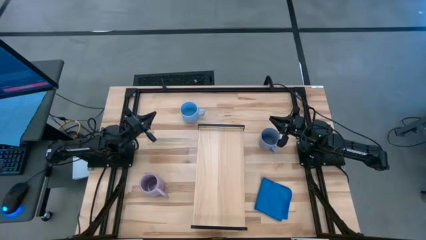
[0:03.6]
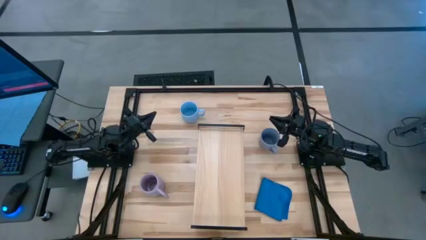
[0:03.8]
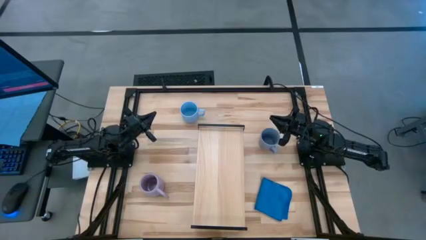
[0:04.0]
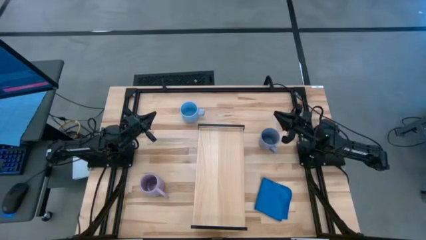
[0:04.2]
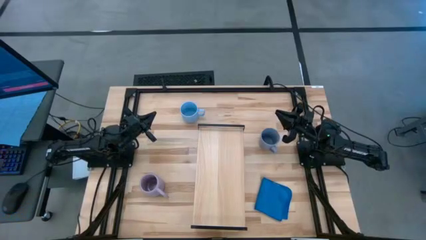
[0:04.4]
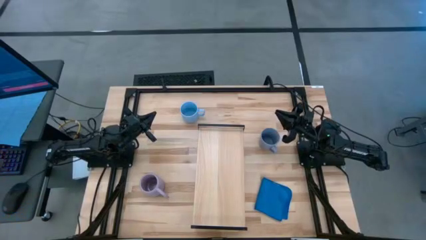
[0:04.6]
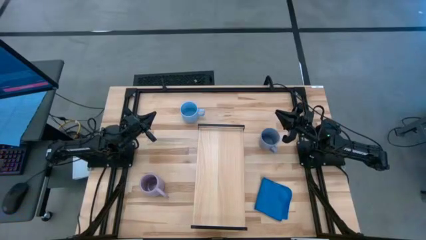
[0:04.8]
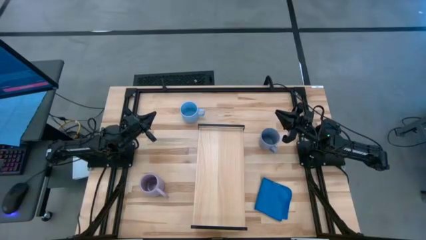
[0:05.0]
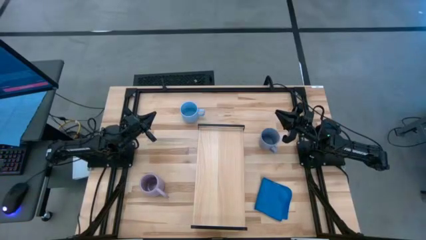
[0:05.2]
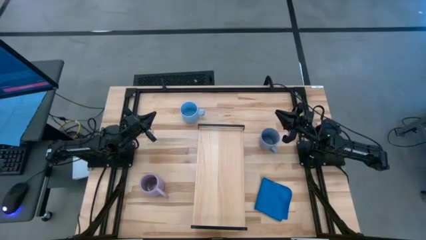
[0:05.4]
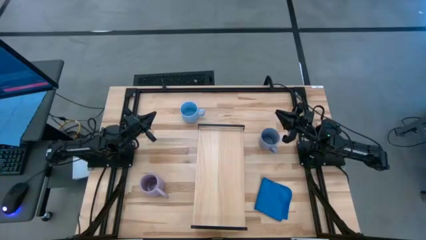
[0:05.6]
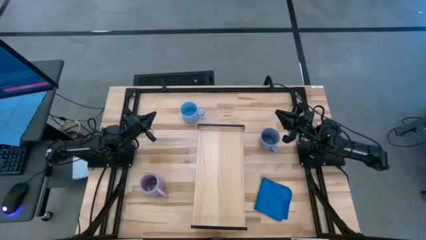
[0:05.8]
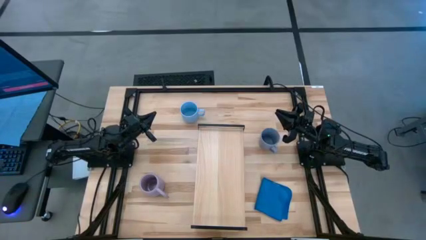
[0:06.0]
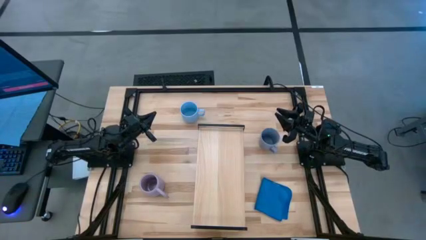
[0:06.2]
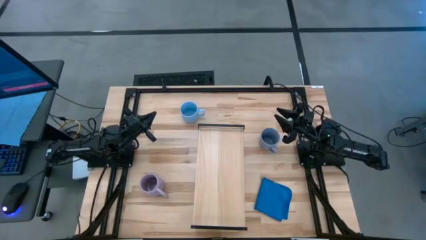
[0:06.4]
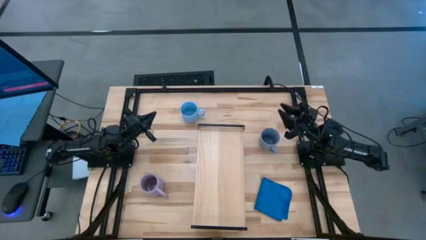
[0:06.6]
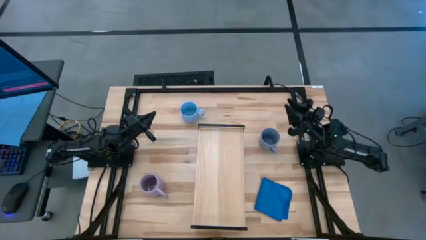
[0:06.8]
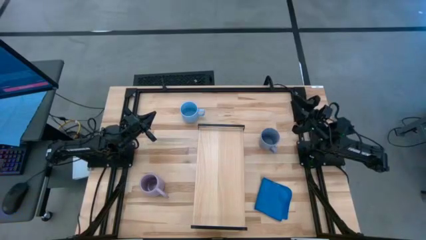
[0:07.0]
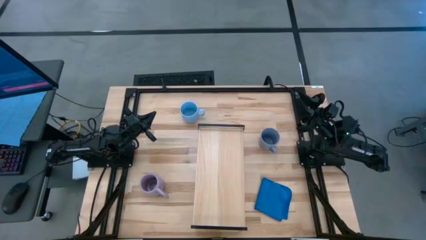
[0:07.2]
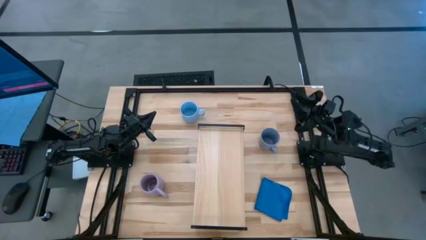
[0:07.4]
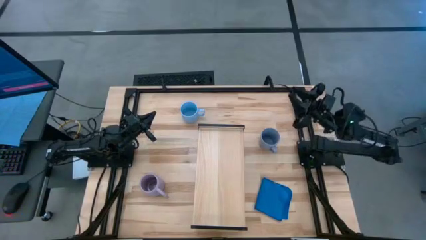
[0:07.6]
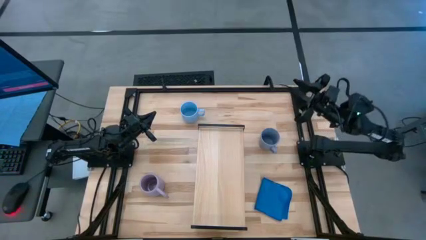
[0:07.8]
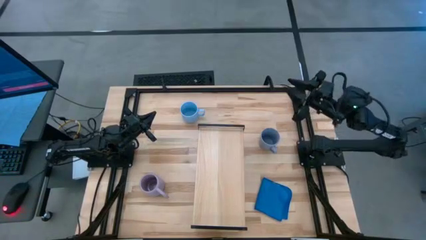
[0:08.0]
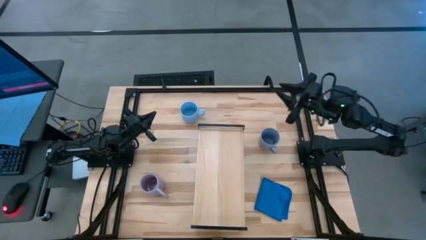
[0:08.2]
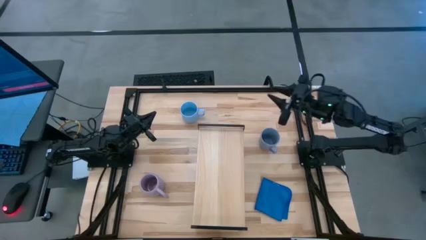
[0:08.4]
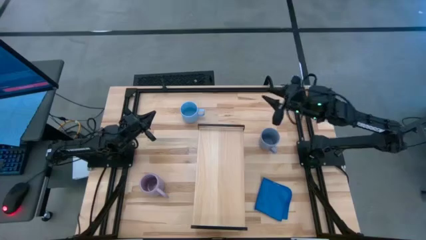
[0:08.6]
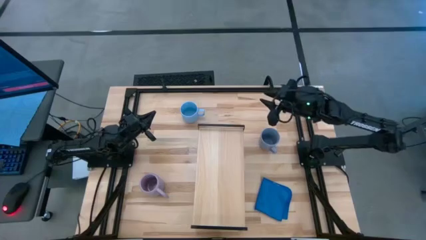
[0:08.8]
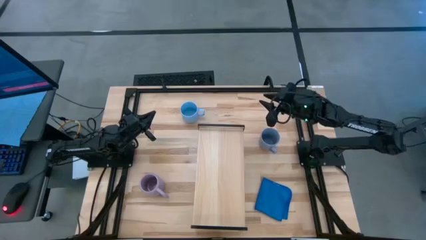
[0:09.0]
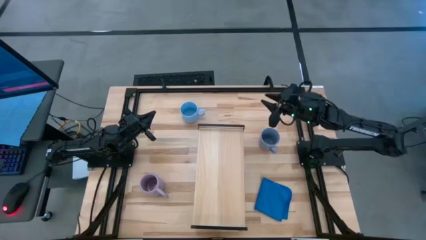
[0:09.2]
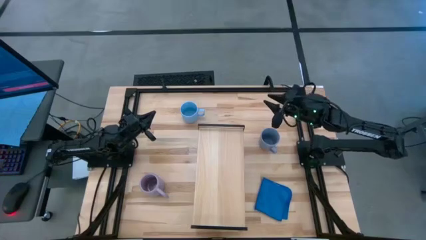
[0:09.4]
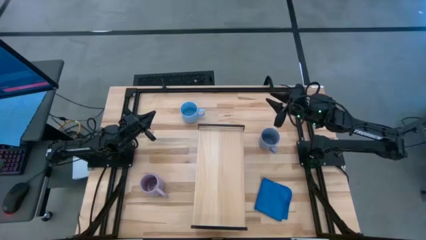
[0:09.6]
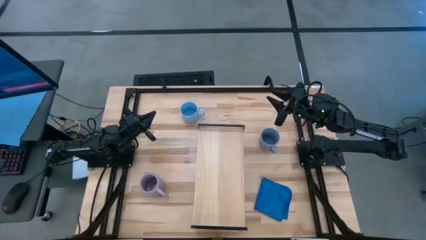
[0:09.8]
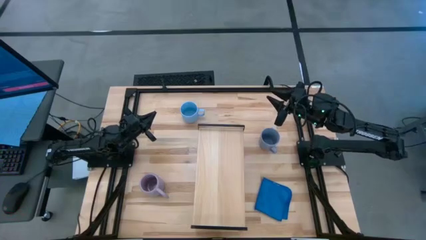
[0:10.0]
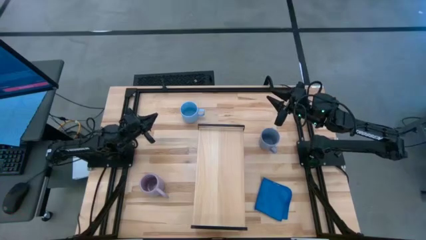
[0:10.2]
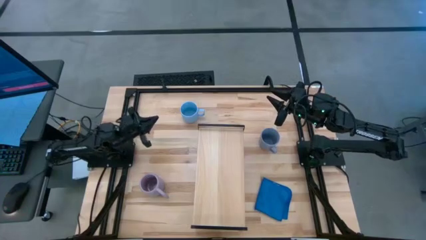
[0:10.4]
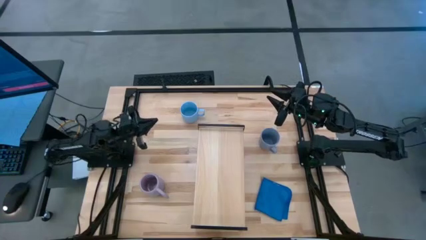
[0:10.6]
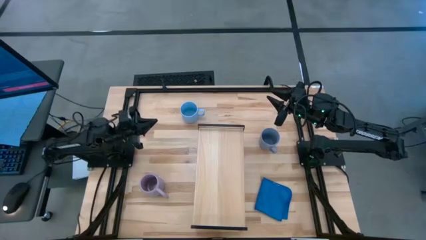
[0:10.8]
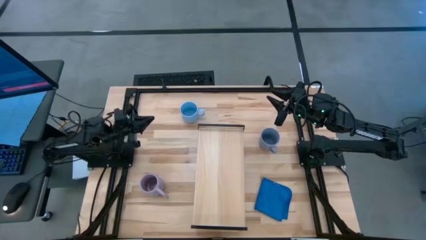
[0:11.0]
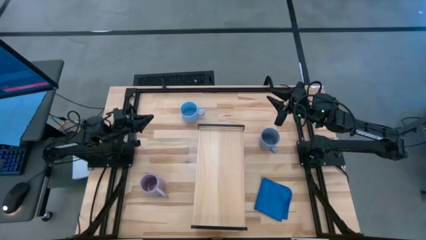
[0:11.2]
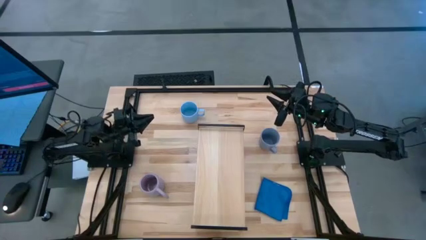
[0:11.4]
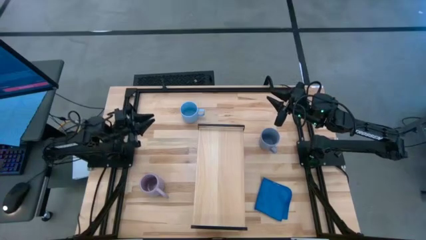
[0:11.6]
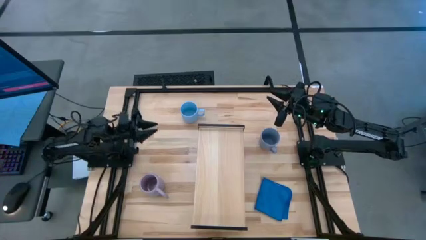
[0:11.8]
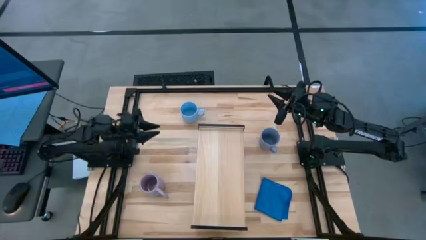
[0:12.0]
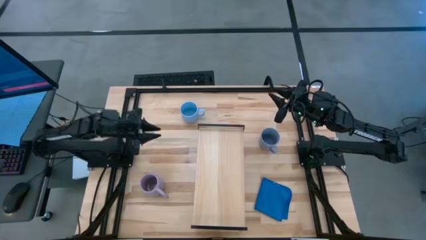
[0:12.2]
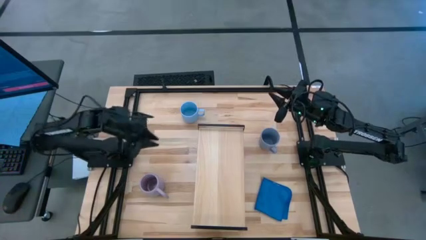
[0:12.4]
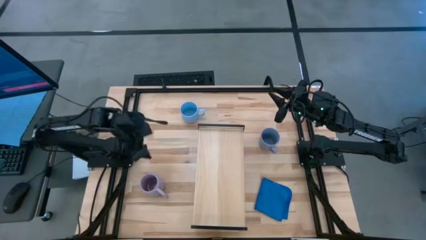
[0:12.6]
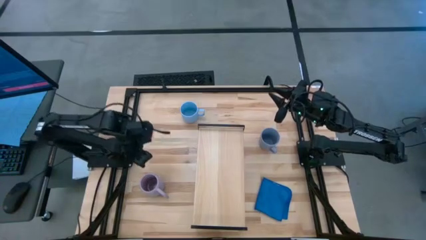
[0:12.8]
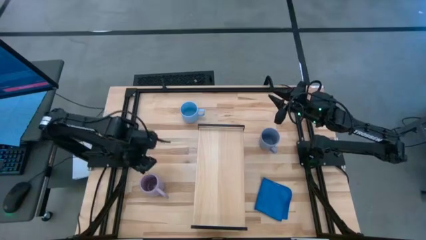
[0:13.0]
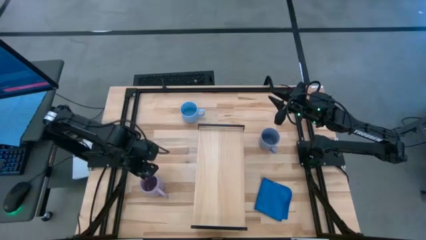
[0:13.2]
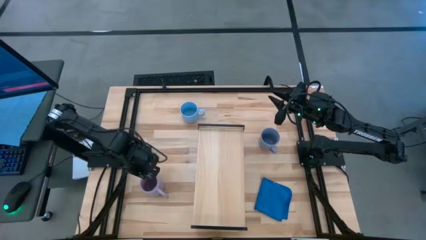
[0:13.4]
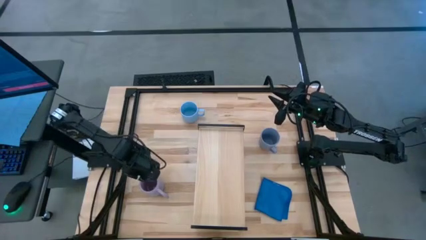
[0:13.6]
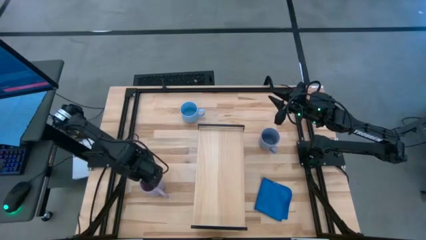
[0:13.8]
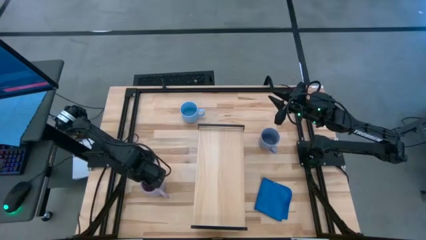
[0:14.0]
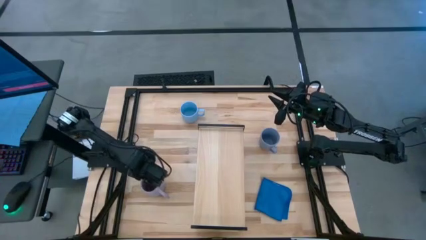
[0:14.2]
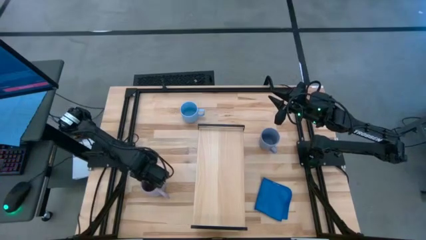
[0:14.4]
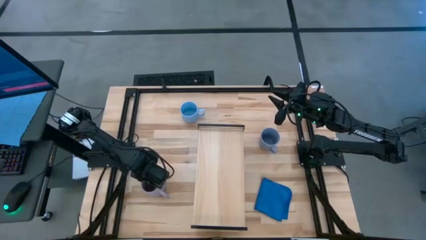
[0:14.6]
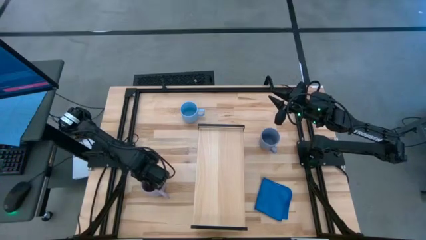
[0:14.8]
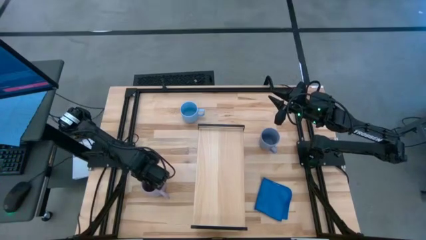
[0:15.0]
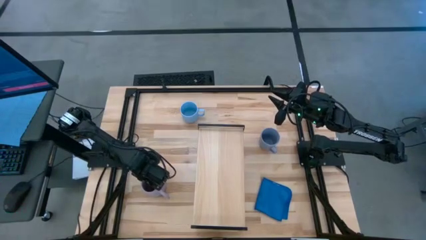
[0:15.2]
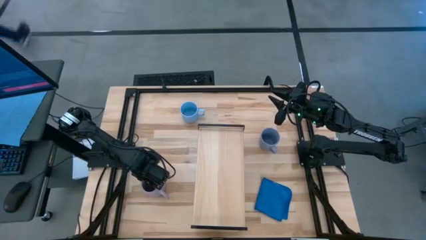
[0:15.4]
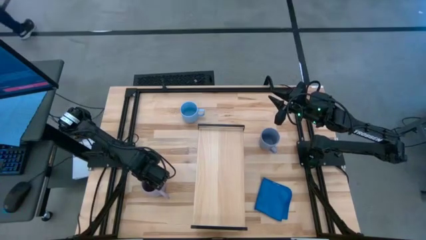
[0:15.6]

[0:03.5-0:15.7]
Task: Stack small to large cups/mugs on shelf
Put the purple mug on the shelf
